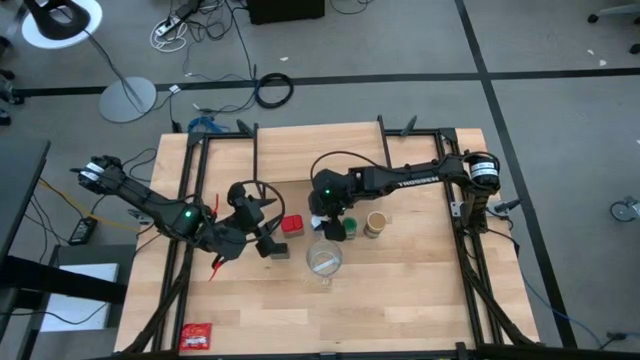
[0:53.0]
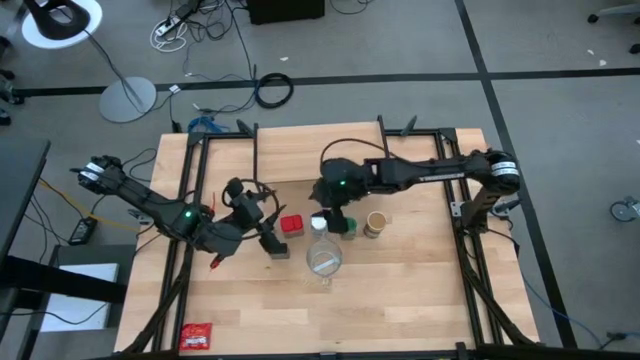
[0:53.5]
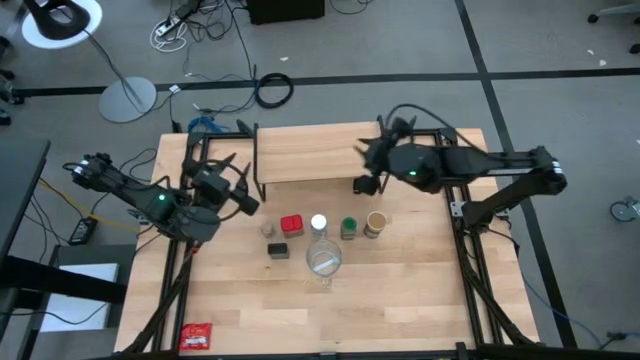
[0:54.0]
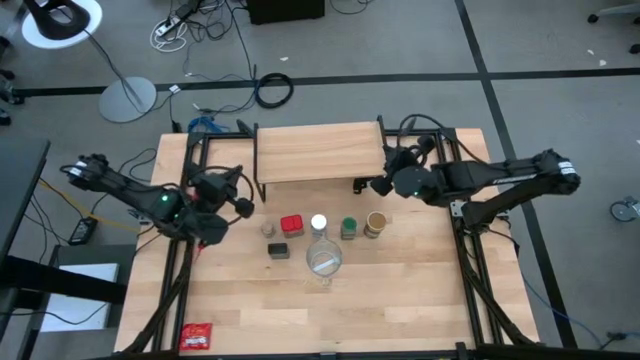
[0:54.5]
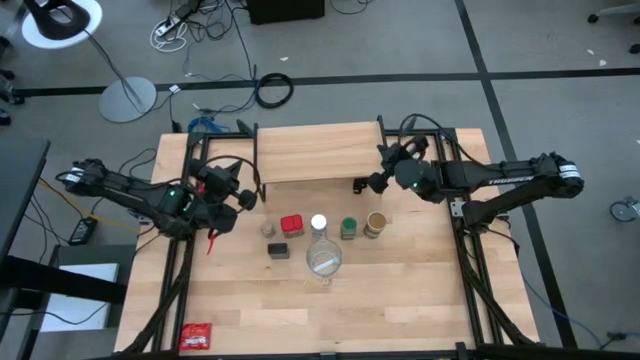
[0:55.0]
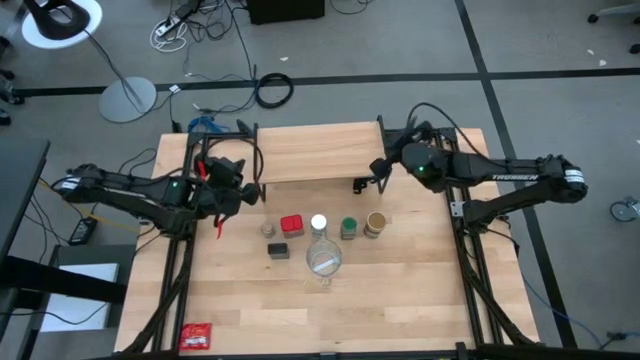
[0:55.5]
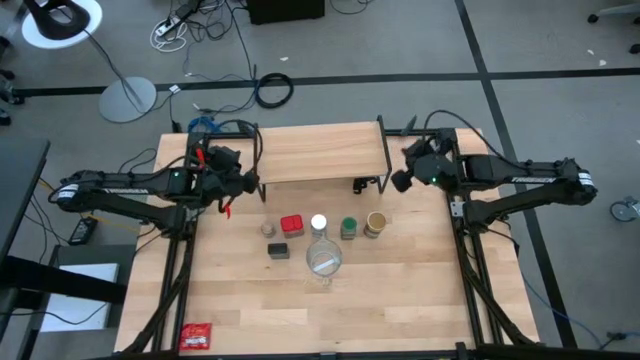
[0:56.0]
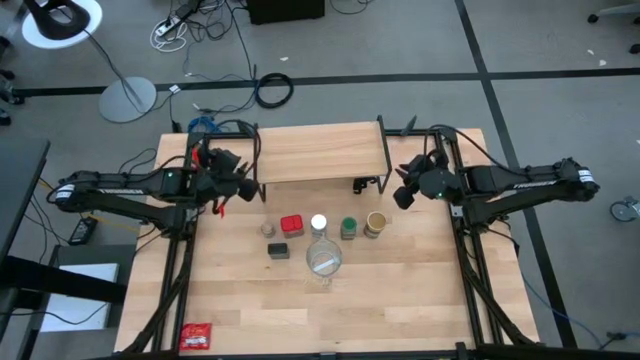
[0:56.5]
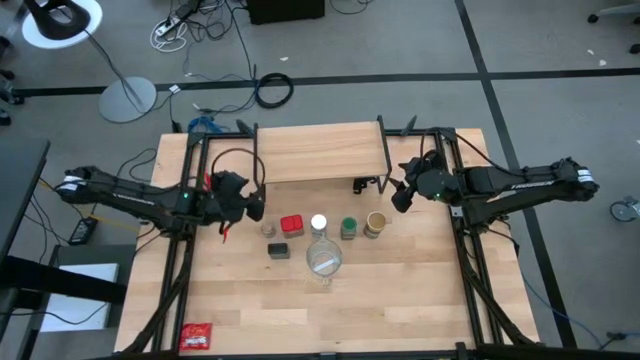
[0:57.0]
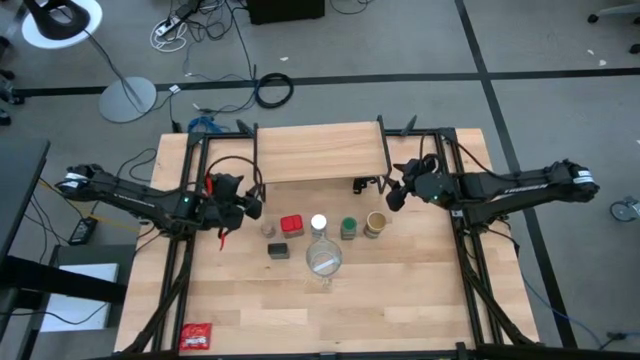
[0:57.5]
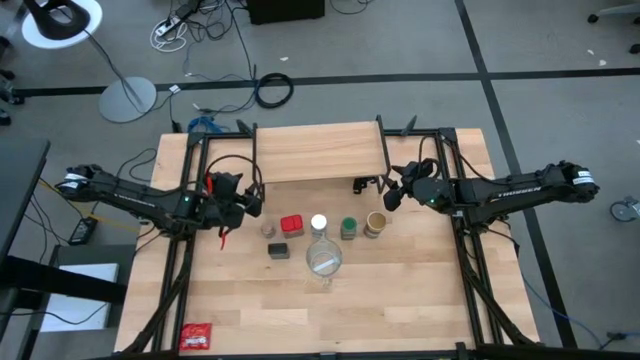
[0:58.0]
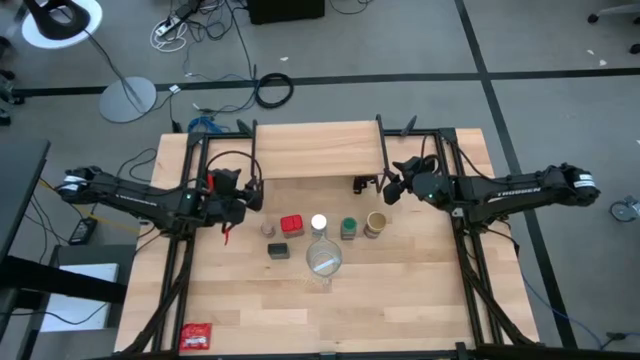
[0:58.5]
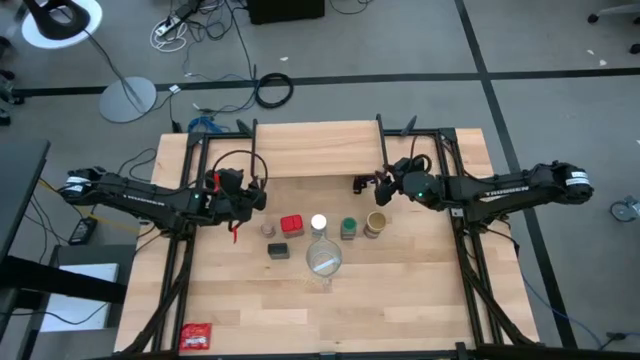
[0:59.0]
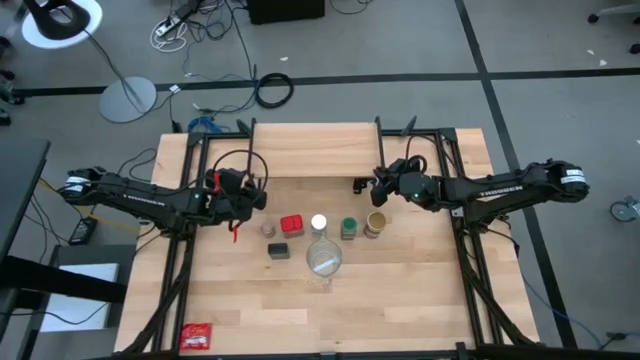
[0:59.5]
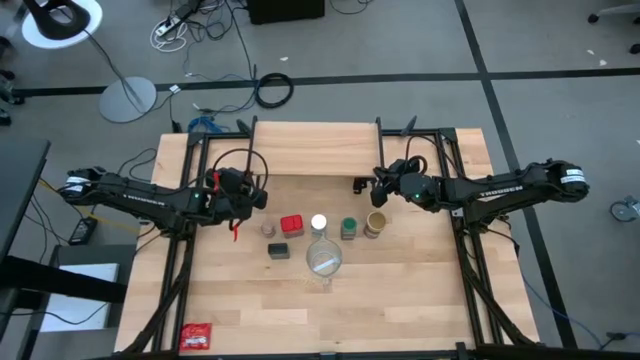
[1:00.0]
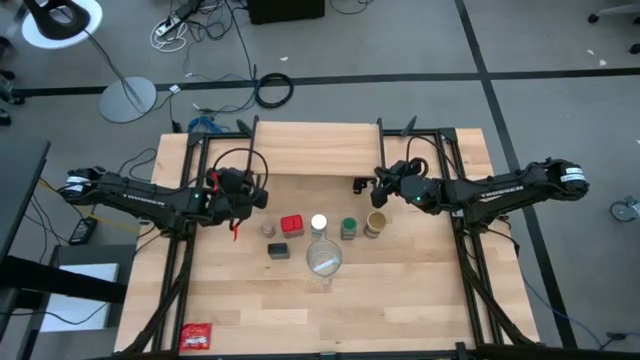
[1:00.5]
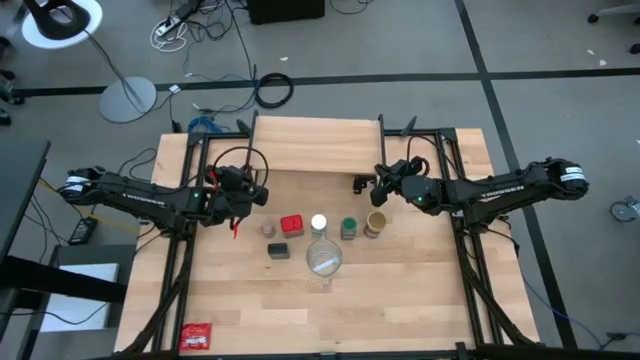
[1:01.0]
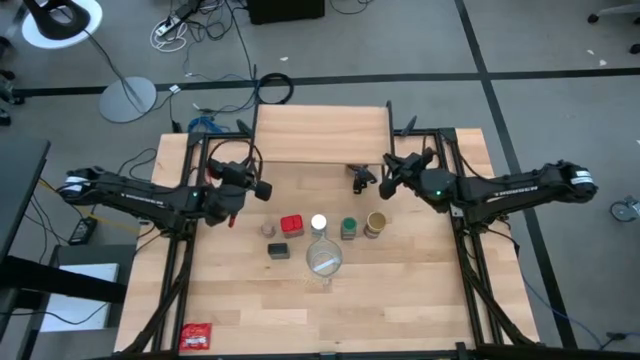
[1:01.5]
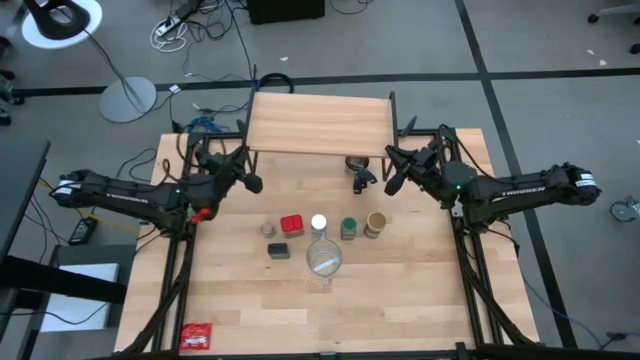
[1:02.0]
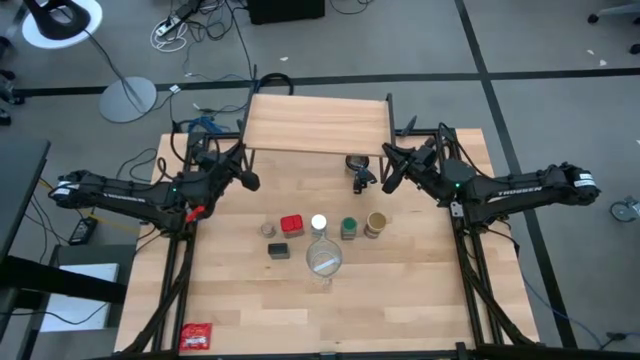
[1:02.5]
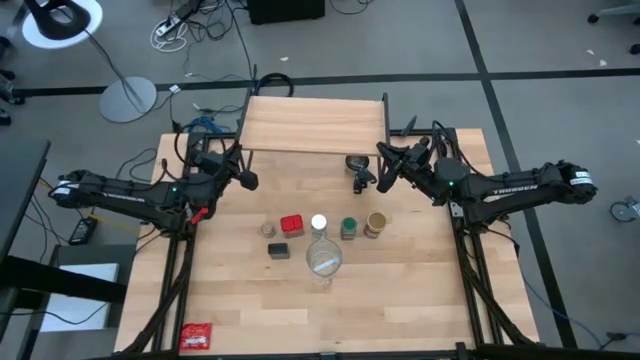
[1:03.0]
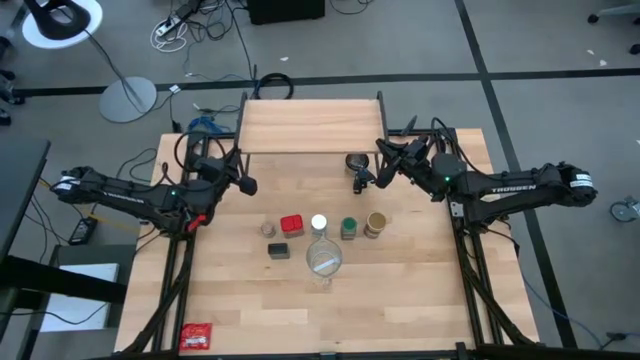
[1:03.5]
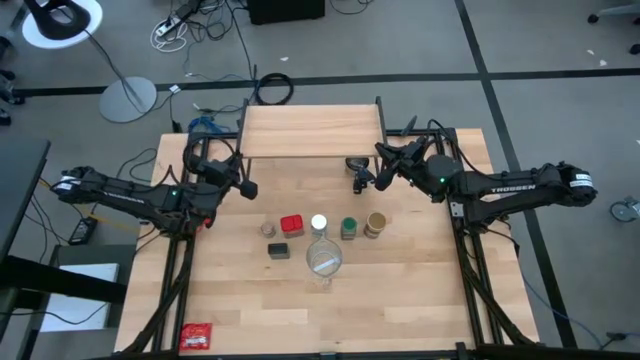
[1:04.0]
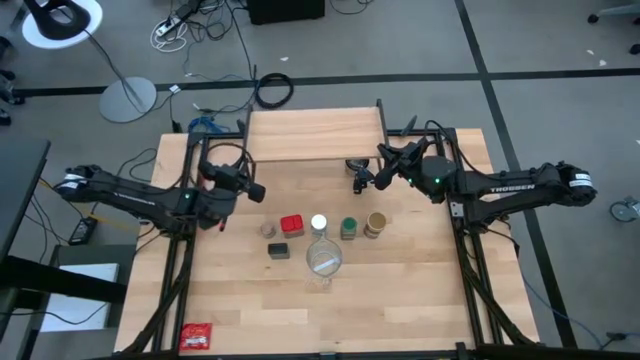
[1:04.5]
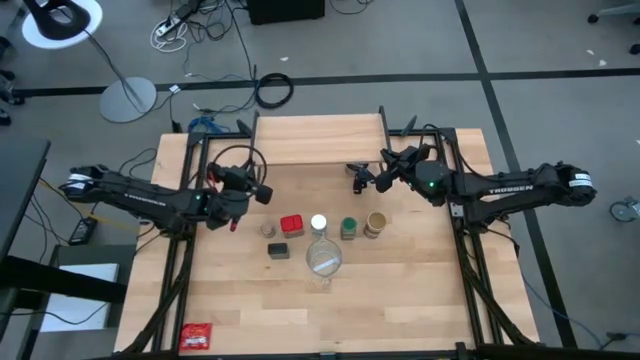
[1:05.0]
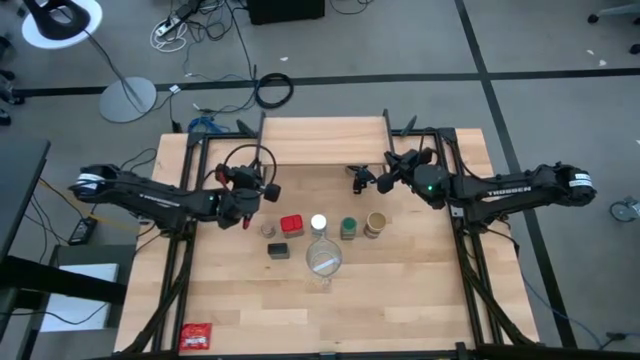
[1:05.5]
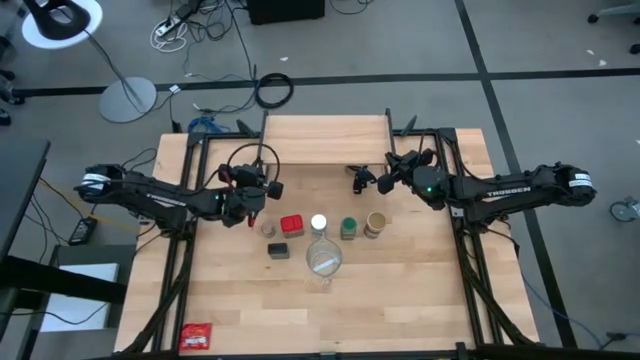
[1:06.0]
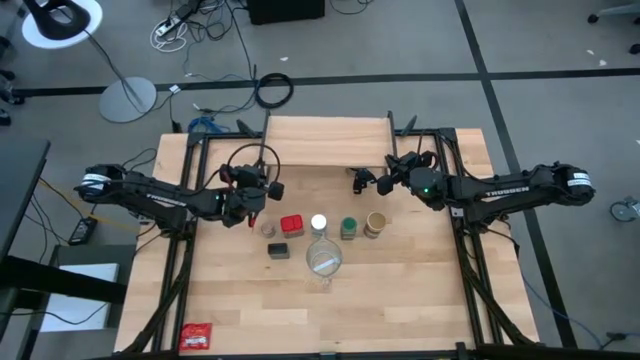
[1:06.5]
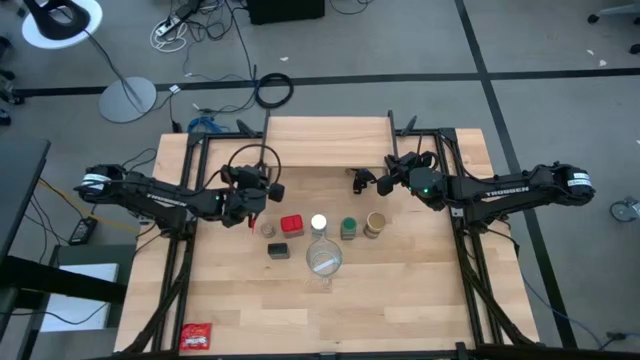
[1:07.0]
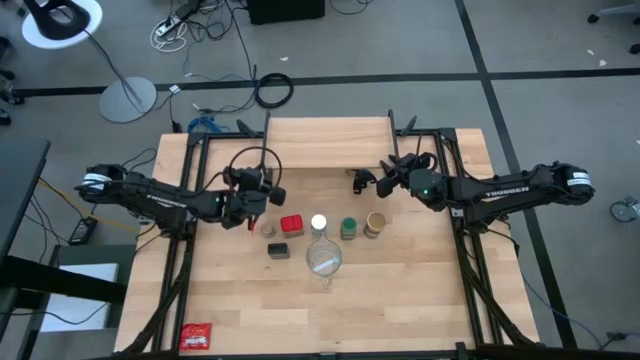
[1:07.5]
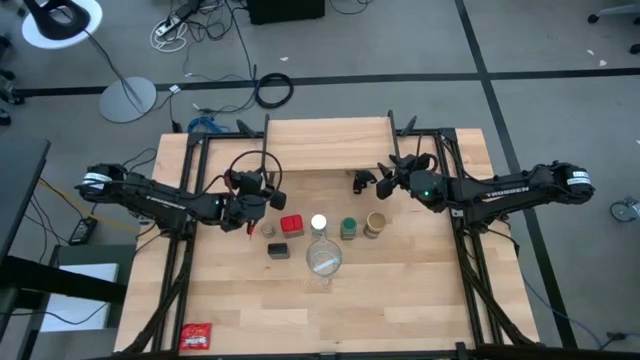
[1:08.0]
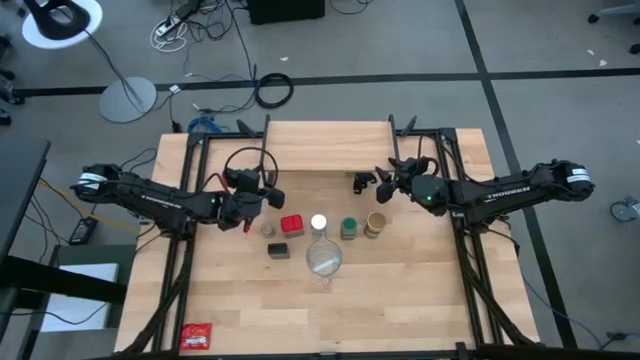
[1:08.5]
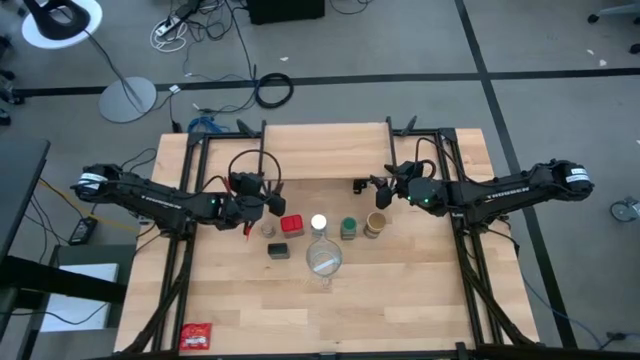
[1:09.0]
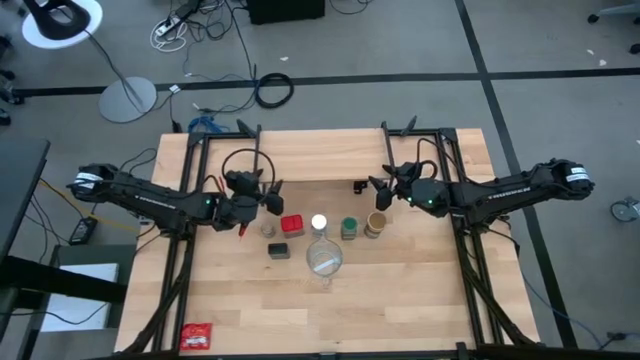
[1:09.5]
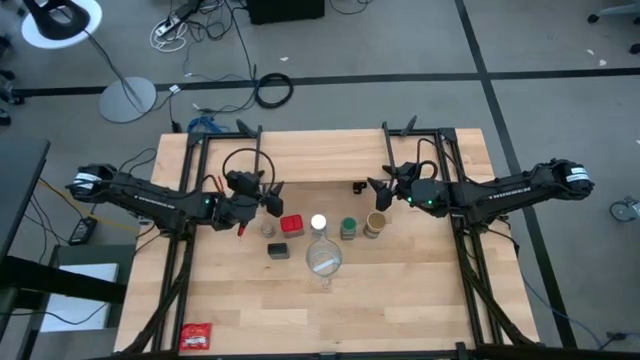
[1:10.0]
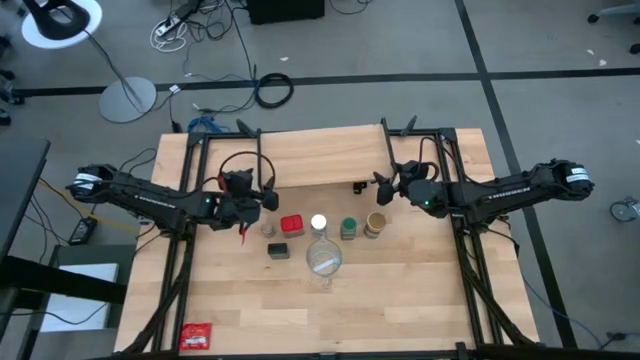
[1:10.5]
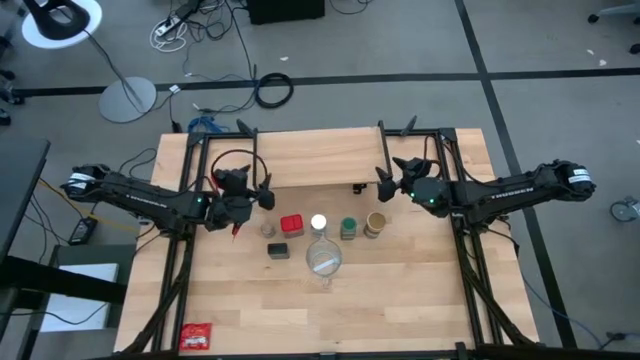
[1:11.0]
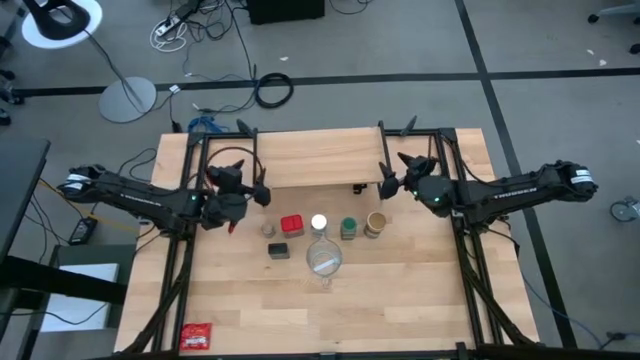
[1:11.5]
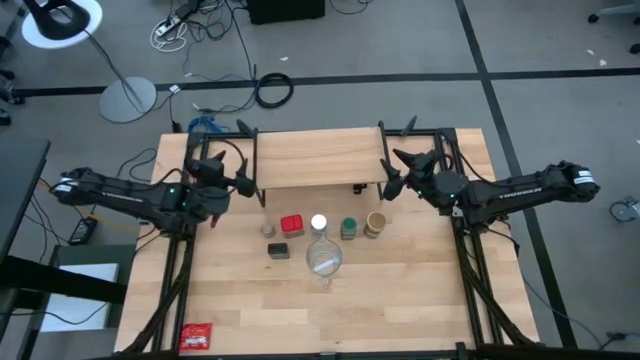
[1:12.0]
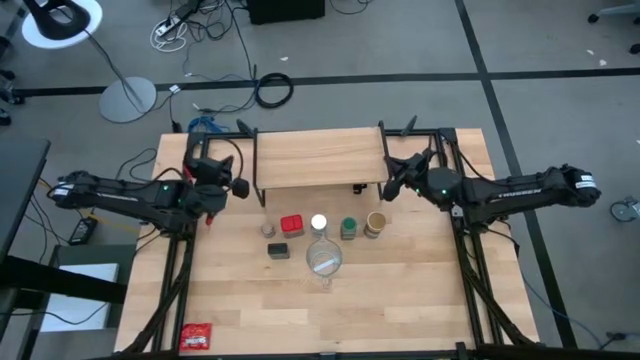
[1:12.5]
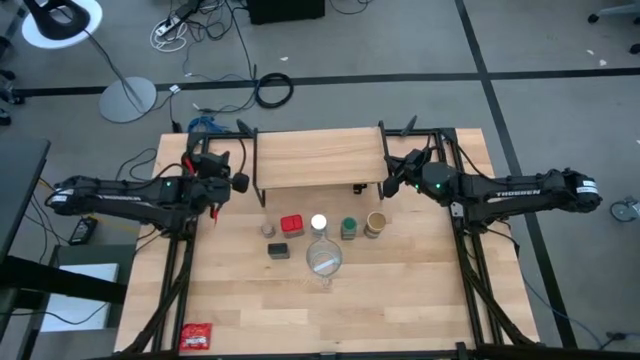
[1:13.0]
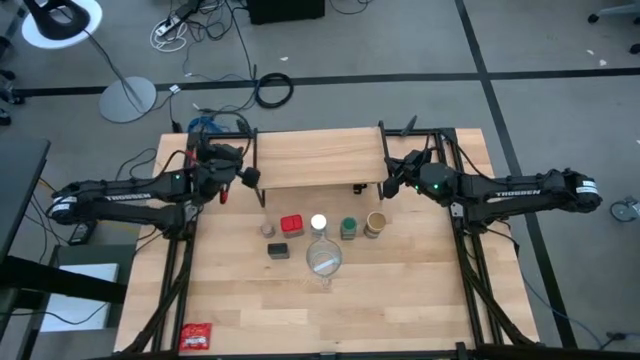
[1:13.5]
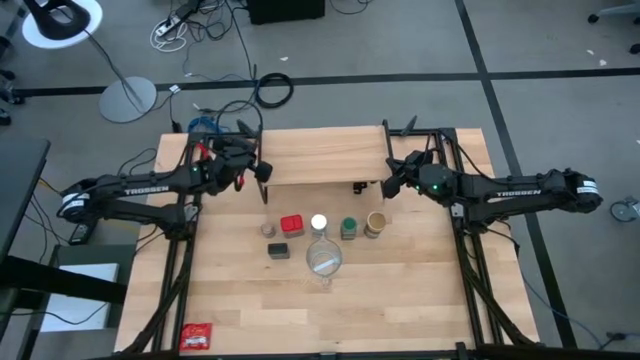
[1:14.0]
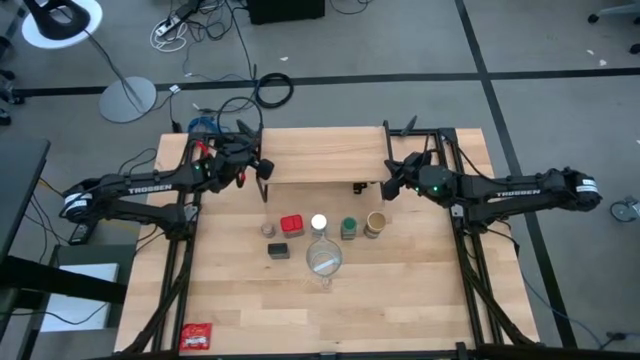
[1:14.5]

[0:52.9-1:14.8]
Task: Shelf spices
Move the shelf to the top center of the table
